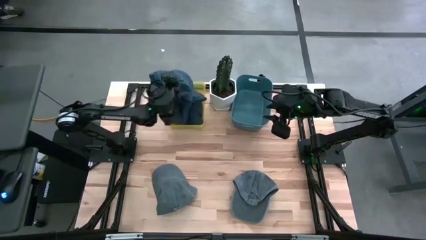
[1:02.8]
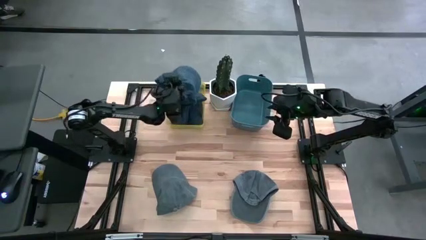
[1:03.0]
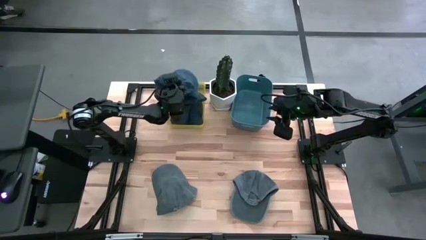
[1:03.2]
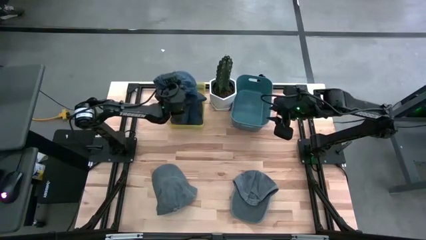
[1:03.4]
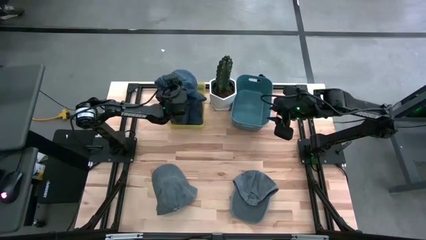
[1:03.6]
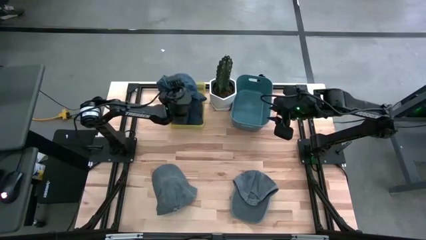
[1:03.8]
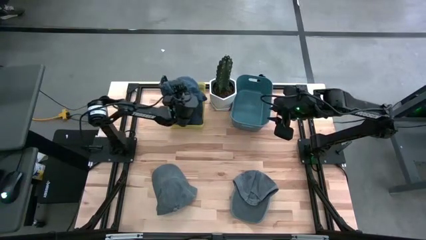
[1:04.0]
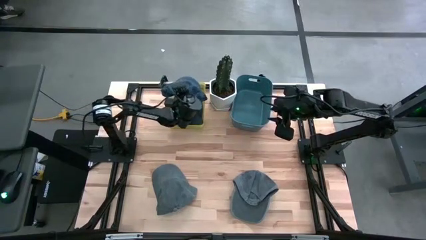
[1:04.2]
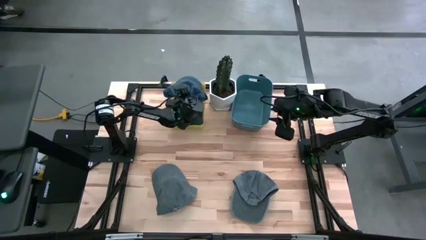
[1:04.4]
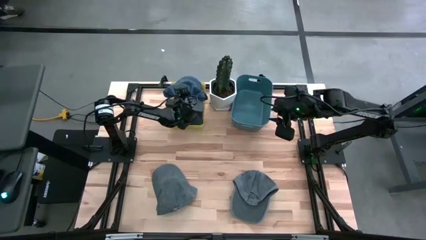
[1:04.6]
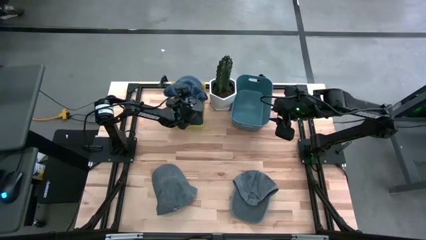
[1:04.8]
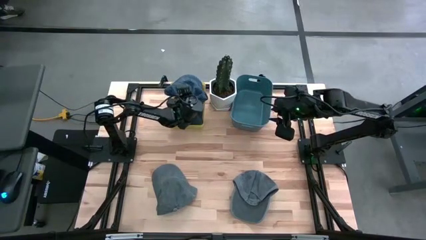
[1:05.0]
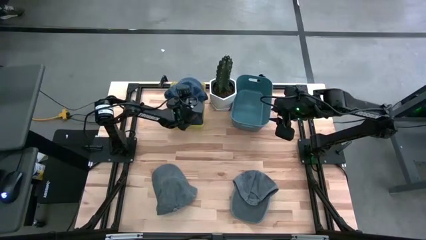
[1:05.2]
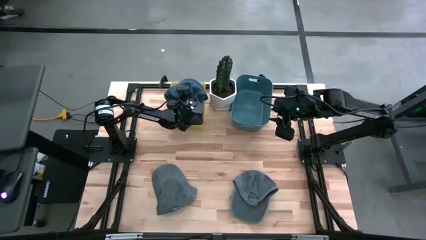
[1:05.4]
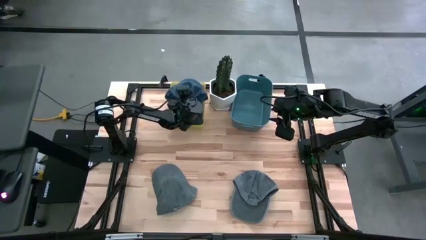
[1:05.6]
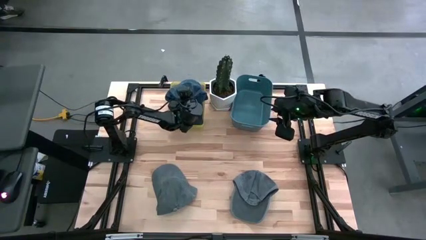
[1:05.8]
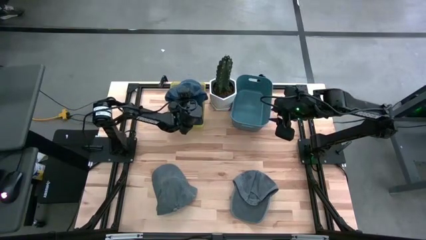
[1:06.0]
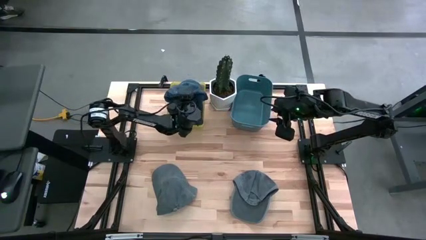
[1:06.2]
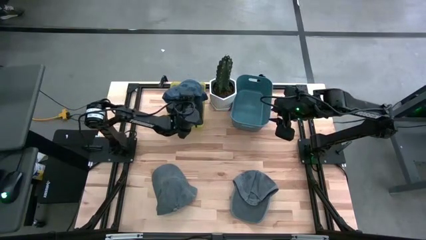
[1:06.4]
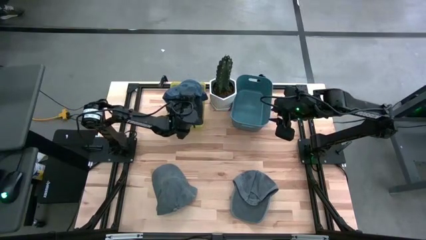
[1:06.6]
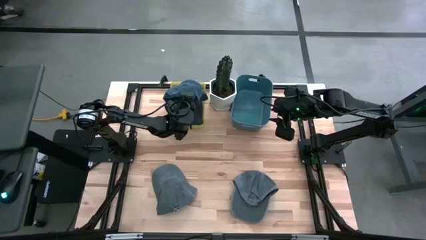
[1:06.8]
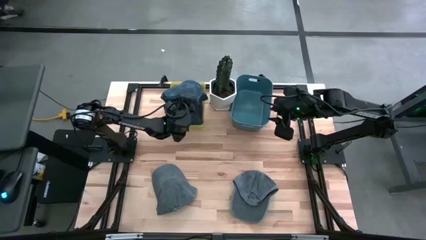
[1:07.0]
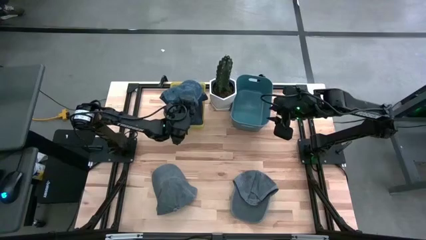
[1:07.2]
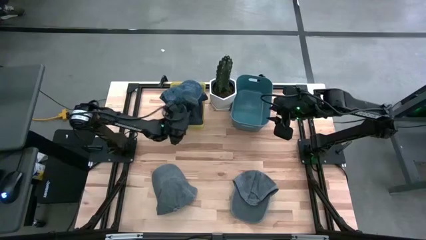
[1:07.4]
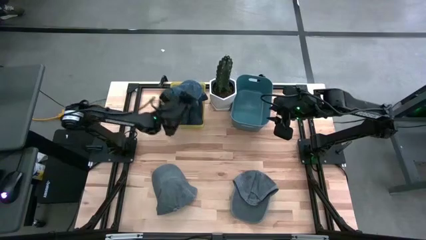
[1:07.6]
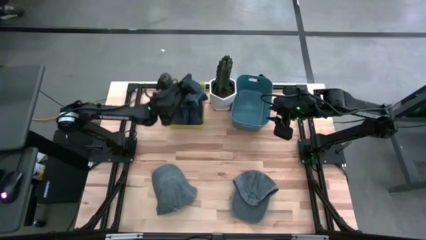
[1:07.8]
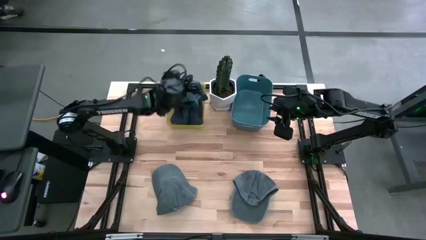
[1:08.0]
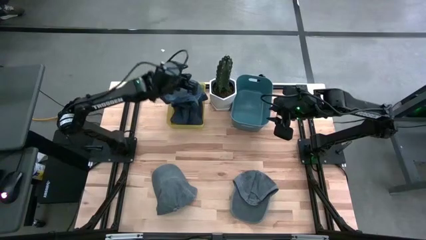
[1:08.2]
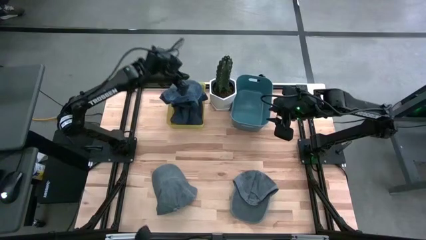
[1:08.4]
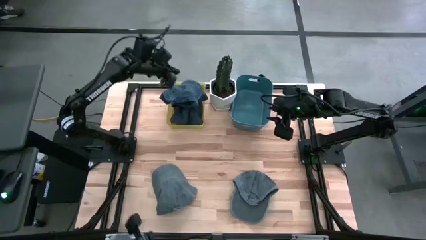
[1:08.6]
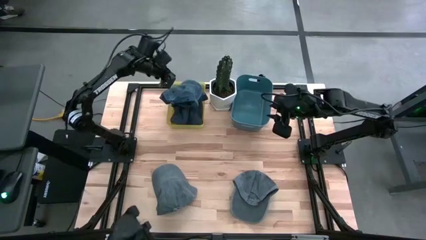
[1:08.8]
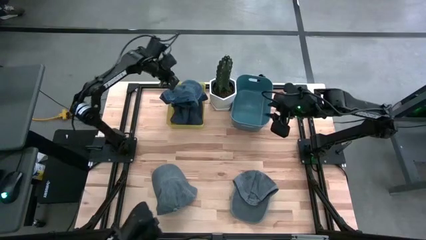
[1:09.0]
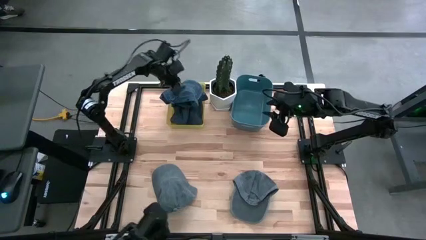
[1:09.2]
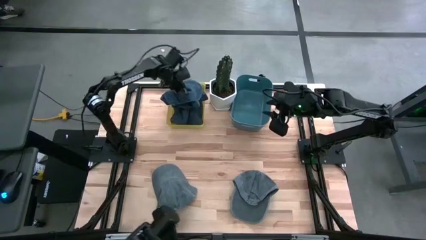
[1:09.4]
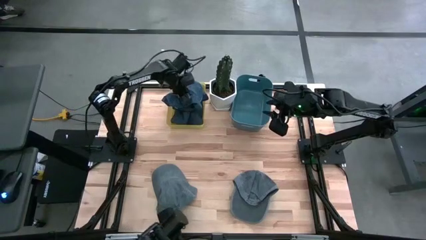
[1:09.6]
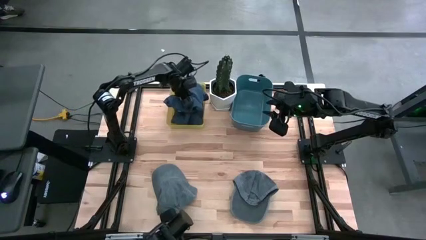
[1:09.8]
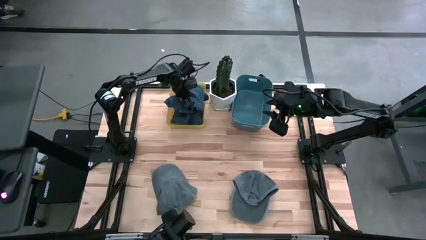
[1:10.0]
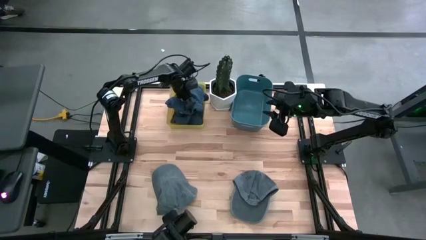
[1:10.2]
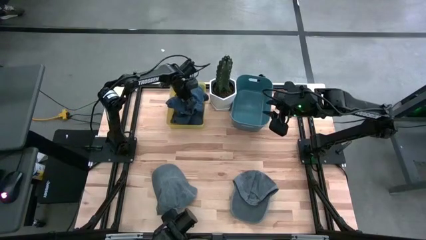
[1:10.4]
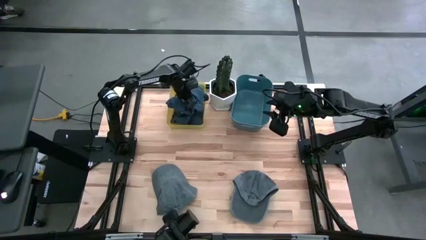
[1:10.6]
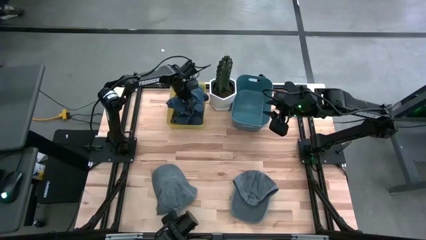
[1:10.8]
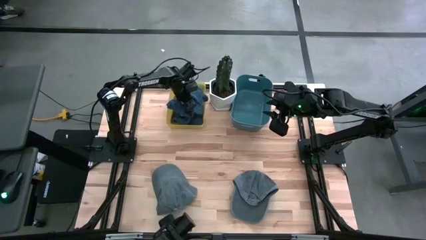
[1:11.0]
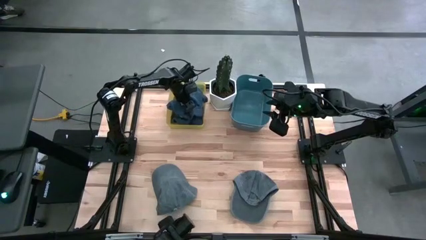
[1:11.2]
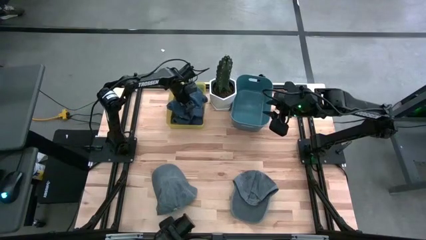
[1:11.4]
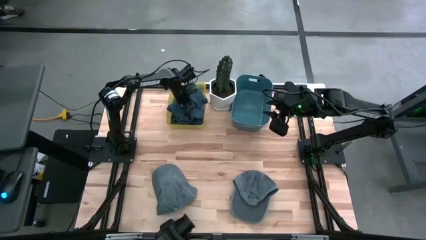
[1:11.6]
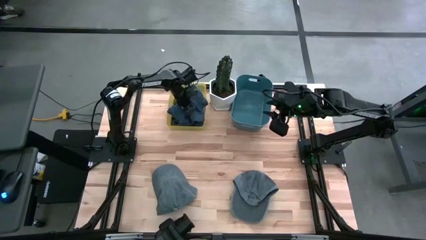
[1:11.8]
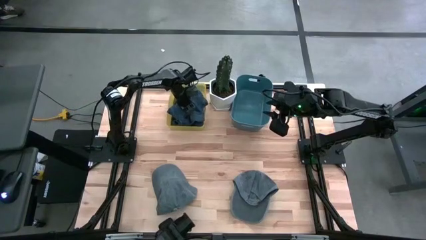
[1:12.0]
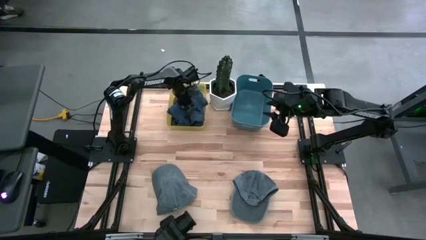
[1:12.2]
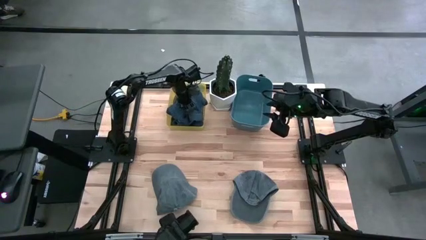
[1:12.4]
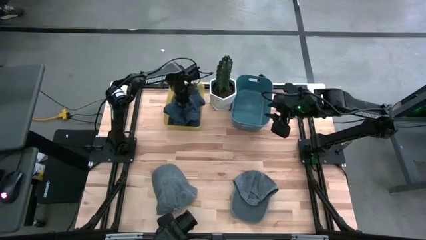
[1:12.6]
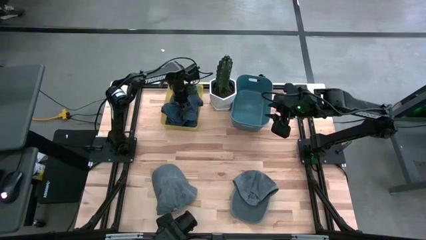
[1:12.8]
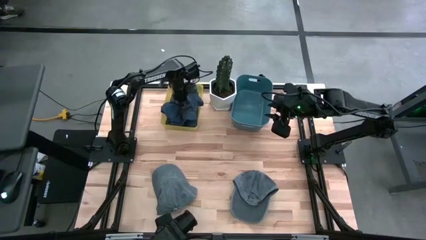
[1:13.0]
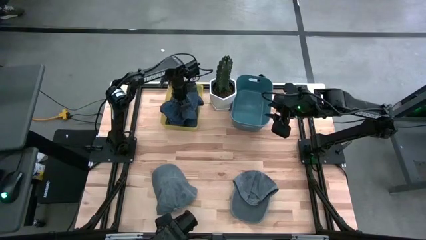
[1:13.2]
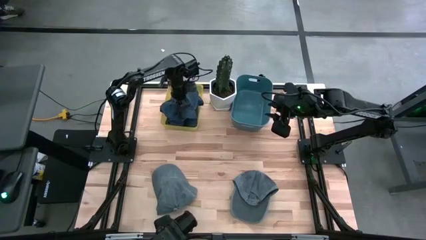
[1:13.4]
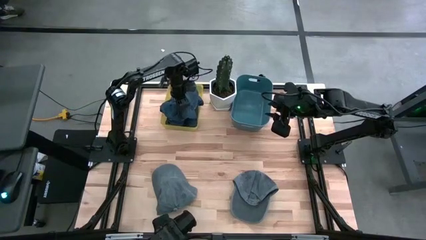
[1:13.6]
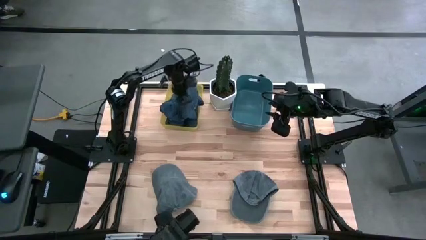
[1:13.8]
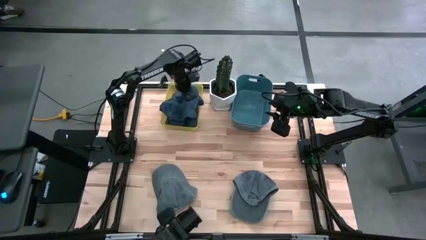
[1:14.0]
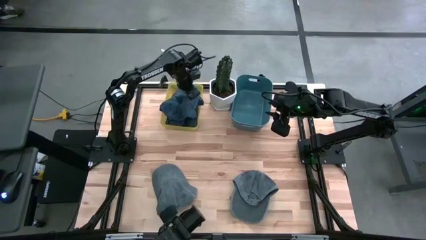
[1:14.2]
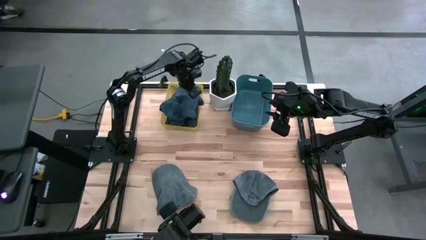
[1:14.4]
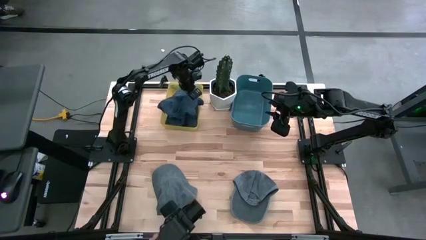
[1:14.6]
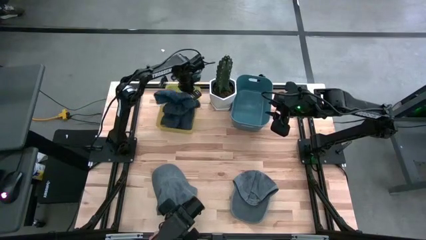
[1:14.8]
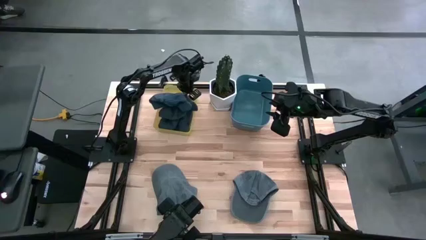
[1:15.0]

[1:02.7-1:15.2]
Task: Pick & Place hat
Put the blue cap into the yellow bin

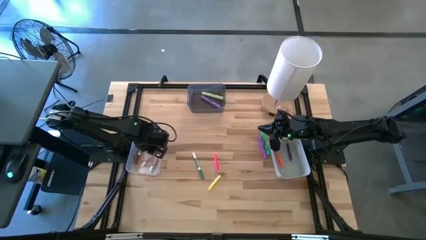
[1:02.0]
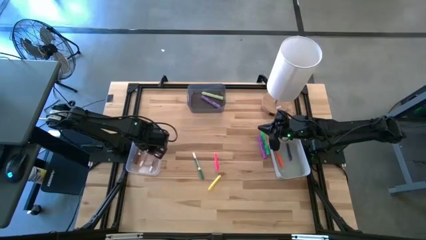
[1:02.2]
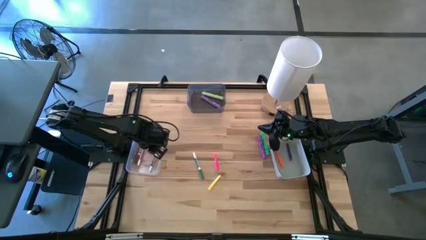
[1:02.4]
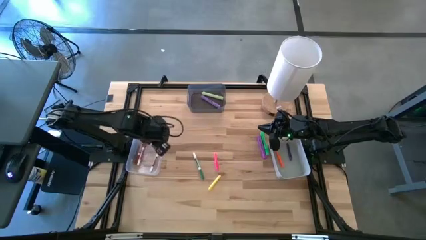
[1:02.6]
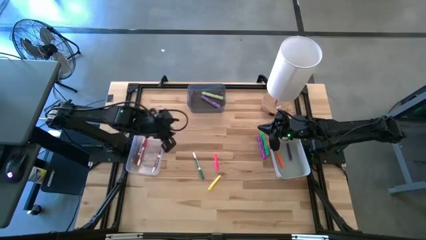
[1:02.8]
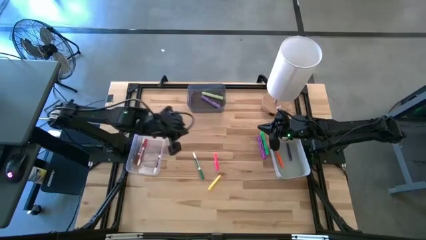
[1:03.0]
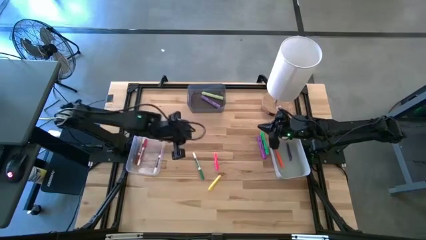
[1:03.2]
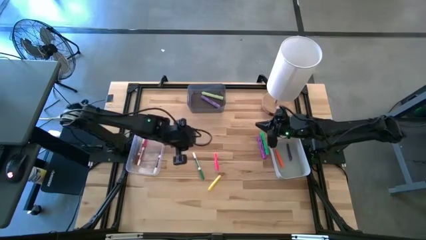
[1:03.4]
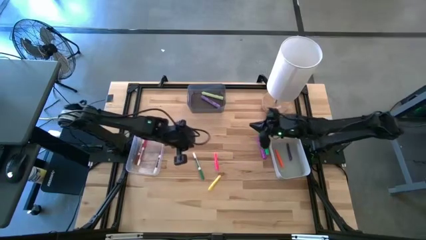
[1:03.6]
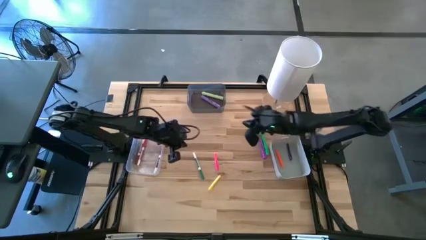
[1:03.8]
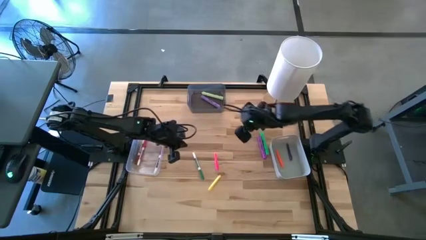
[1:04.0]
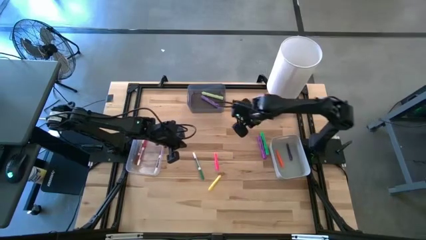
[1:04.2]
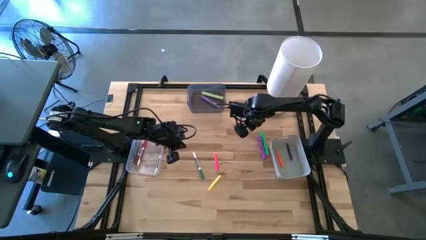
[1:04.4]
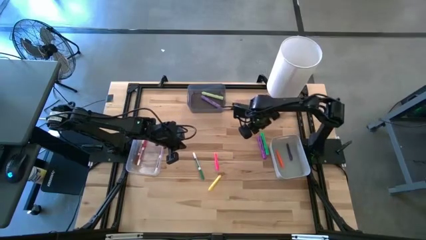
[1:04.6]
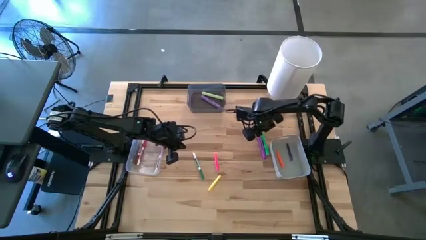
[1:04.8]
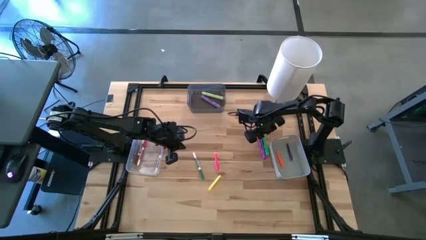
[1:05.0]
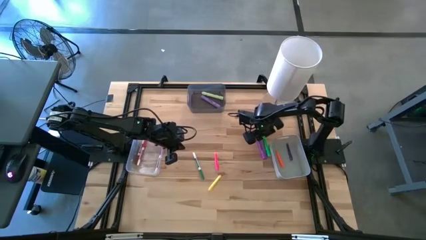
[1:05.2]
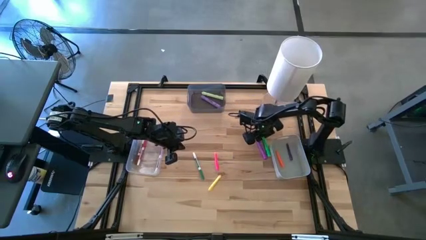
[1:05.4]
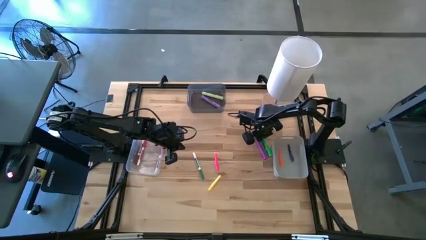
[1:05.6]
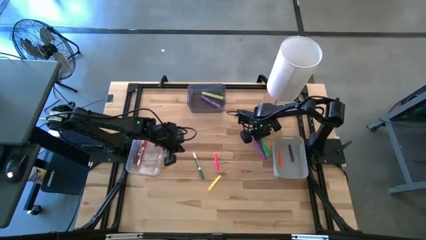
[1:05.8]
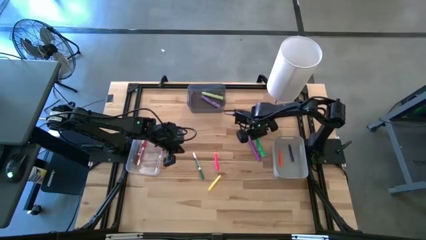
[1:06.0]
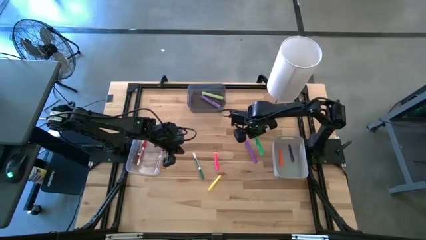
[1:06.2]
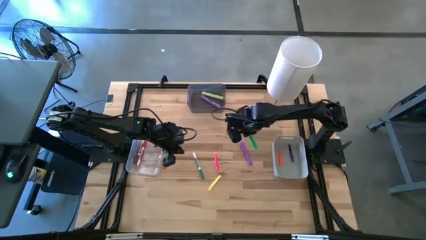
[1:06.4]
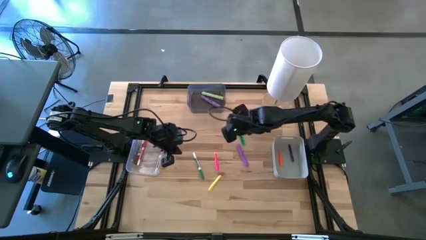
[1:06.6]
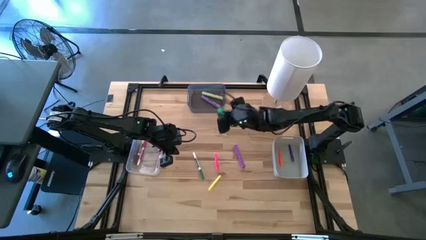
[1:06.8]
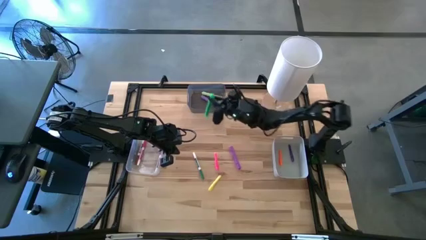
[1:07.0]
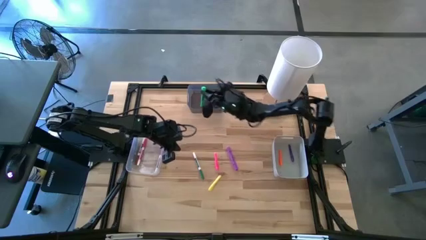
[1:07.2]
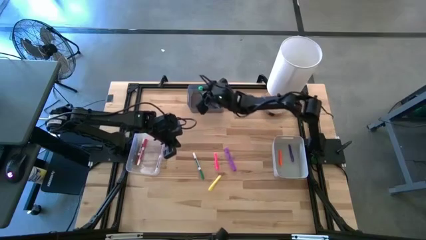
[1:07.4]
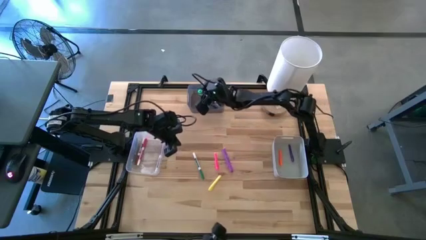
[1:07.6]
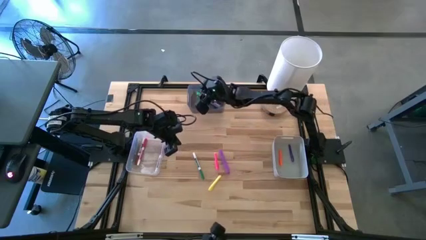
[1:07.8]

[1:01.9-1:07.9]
Task: Pick & Place Markers
Put the green highlighter into the black bin
